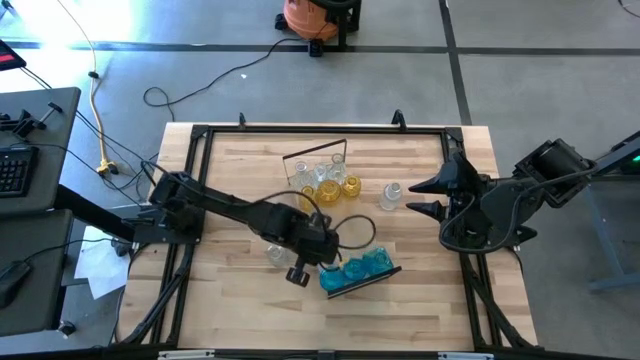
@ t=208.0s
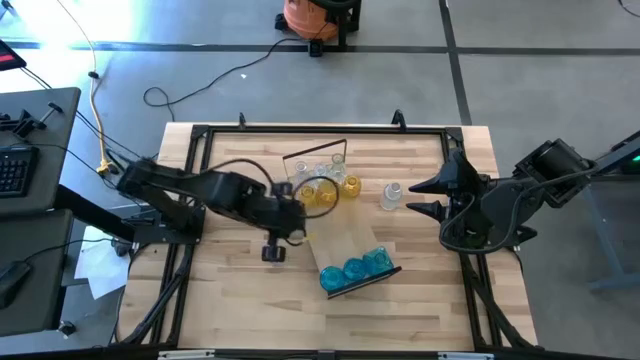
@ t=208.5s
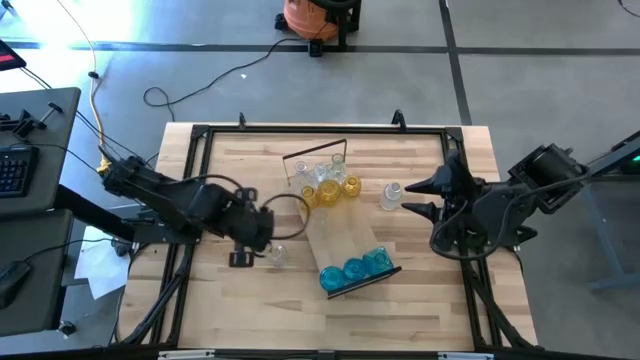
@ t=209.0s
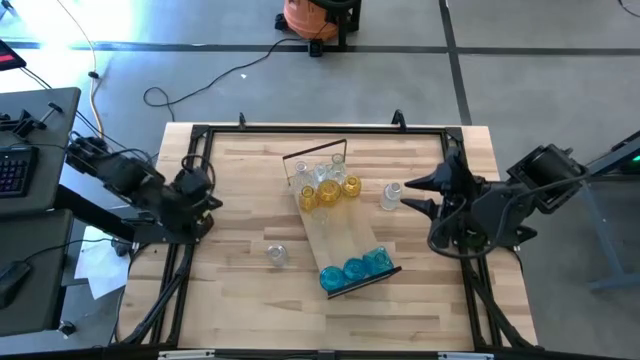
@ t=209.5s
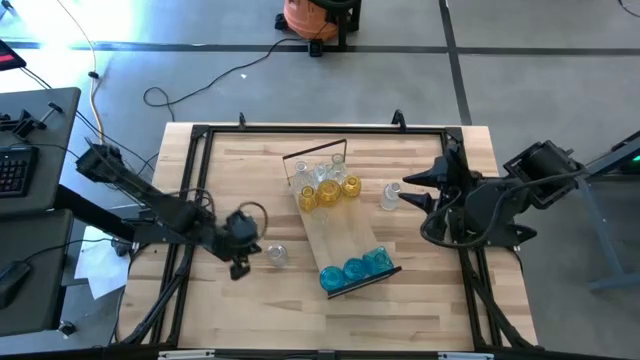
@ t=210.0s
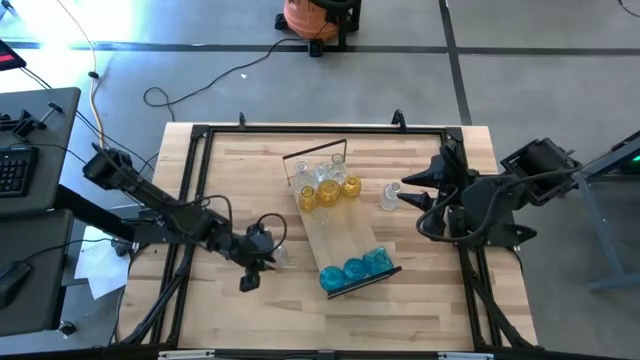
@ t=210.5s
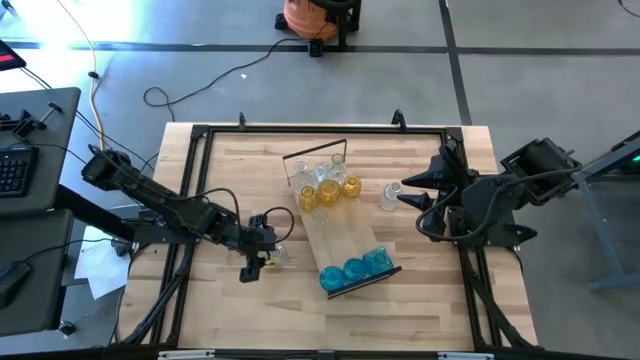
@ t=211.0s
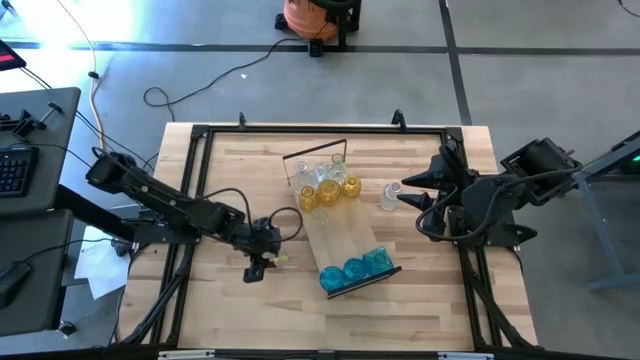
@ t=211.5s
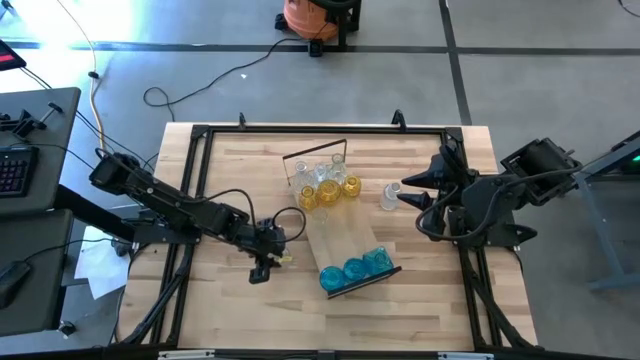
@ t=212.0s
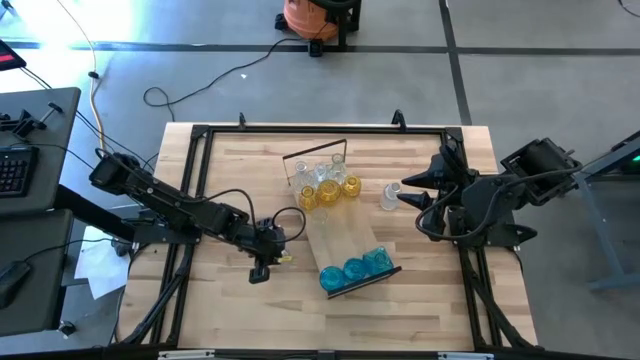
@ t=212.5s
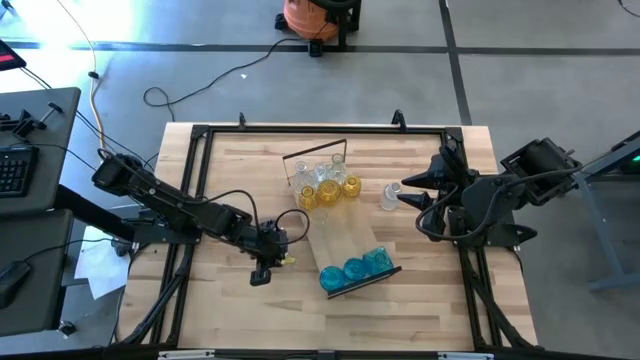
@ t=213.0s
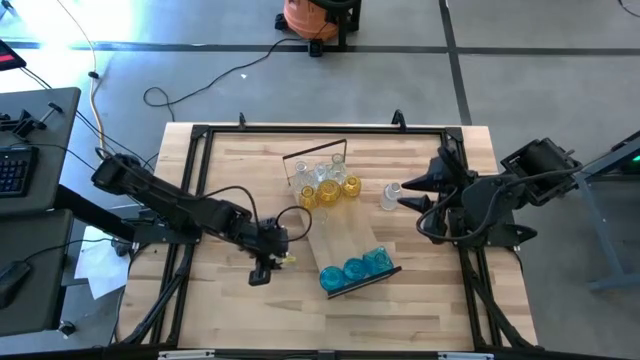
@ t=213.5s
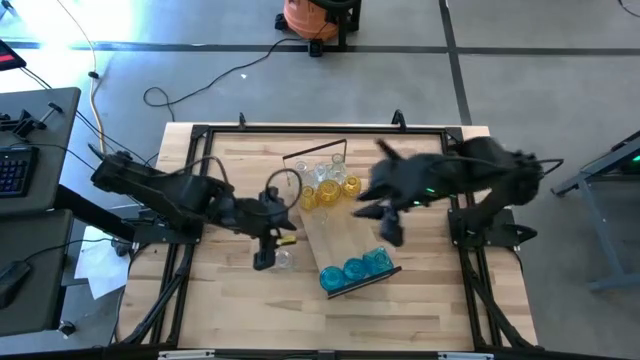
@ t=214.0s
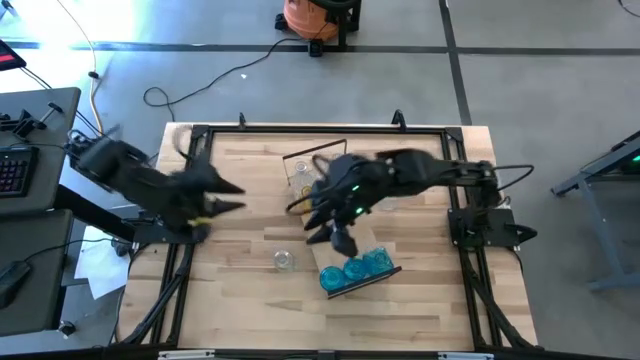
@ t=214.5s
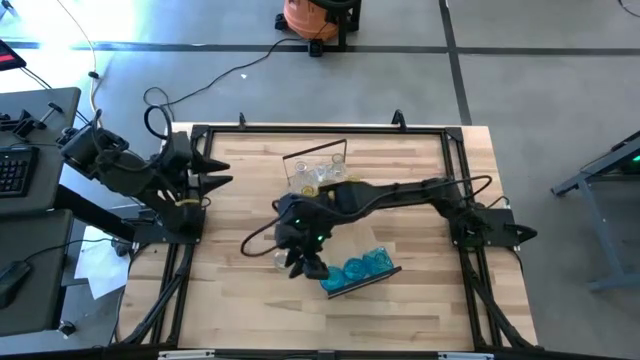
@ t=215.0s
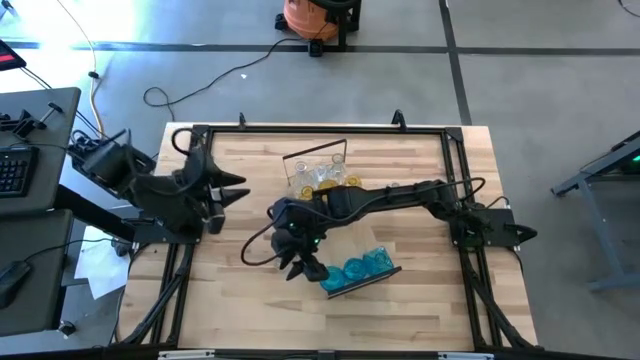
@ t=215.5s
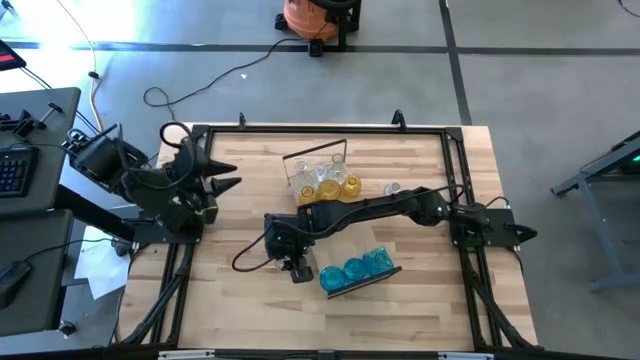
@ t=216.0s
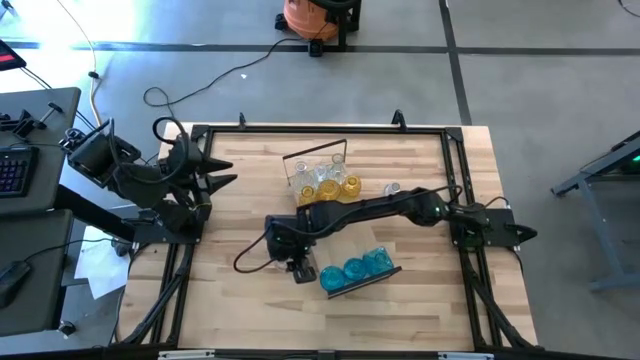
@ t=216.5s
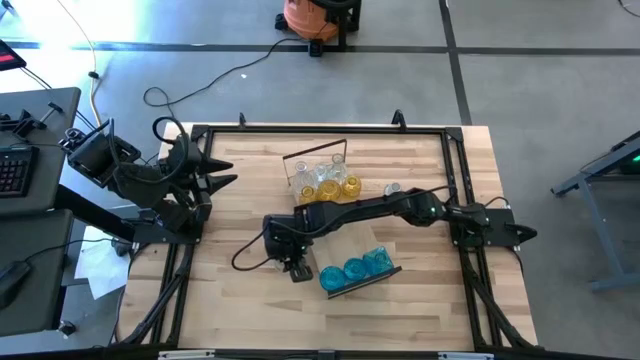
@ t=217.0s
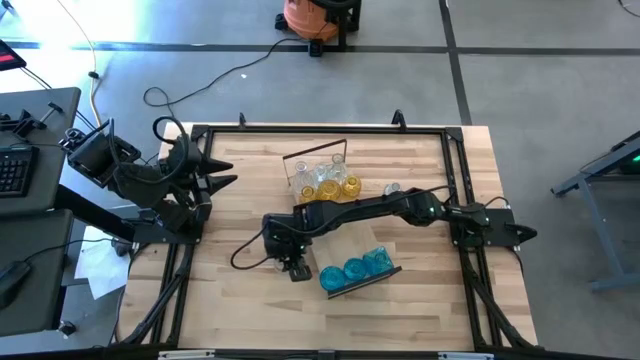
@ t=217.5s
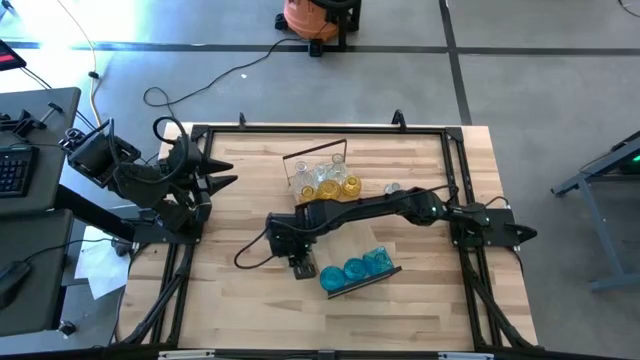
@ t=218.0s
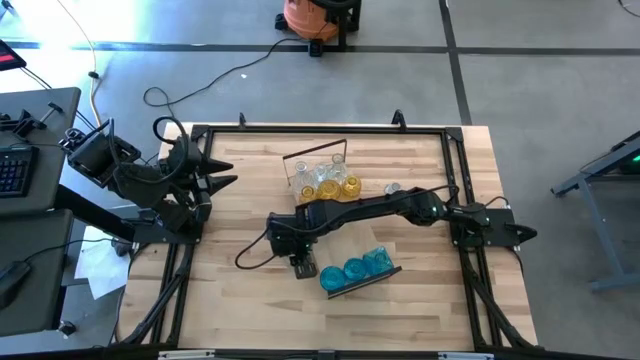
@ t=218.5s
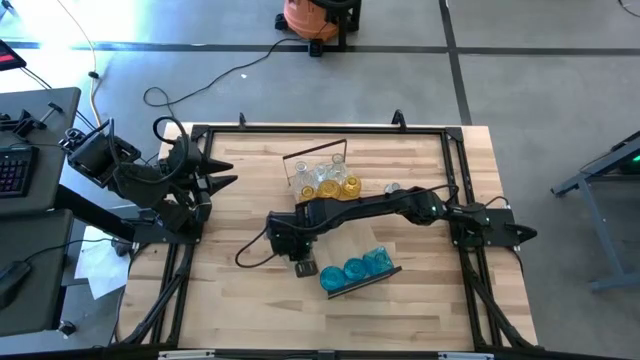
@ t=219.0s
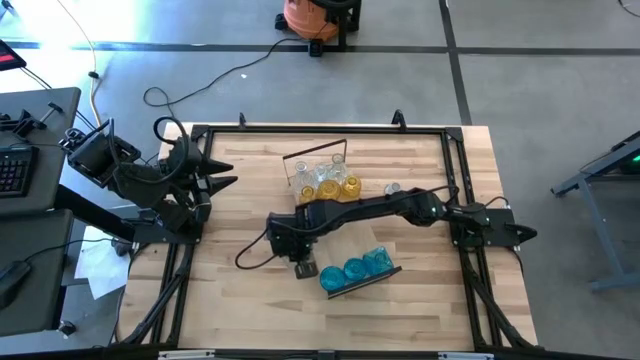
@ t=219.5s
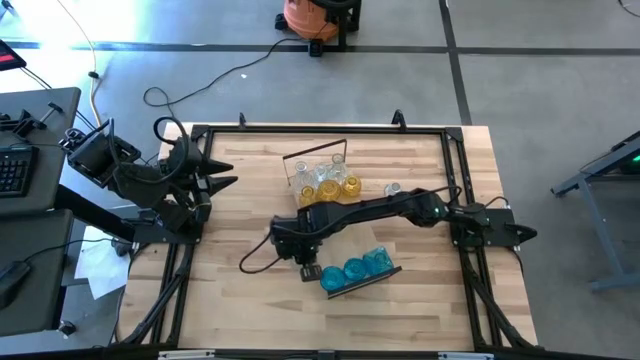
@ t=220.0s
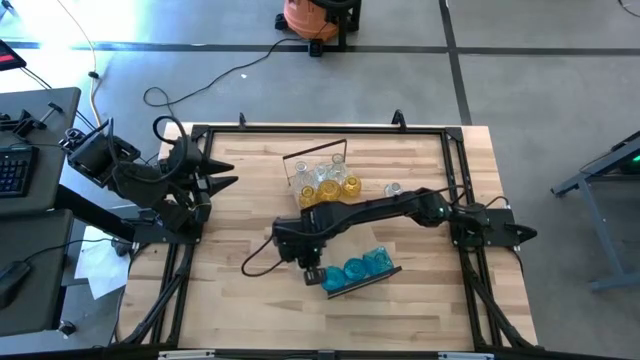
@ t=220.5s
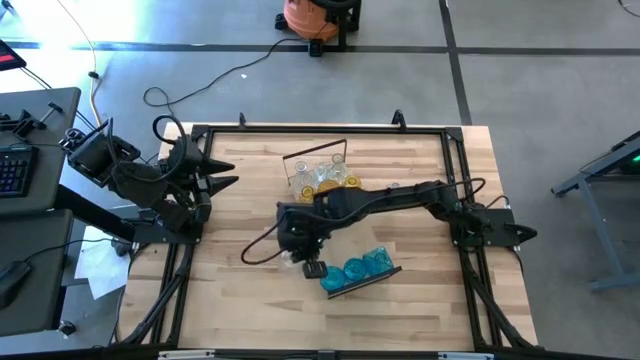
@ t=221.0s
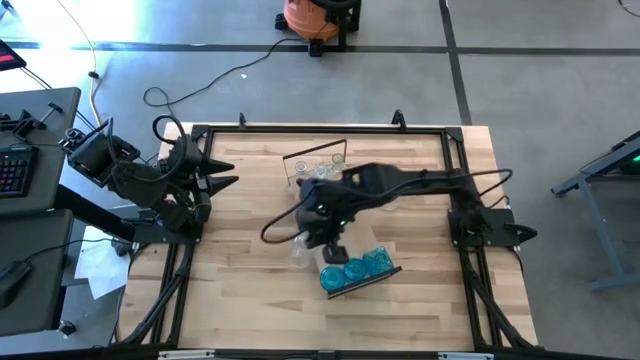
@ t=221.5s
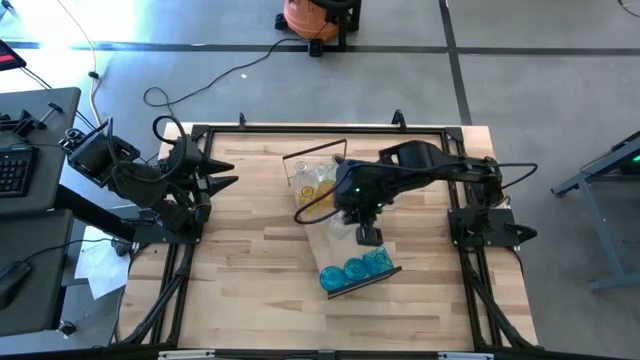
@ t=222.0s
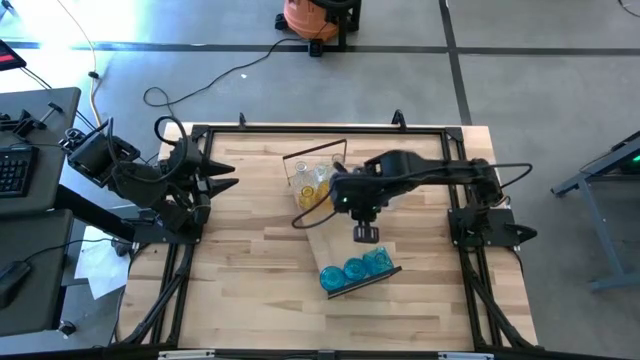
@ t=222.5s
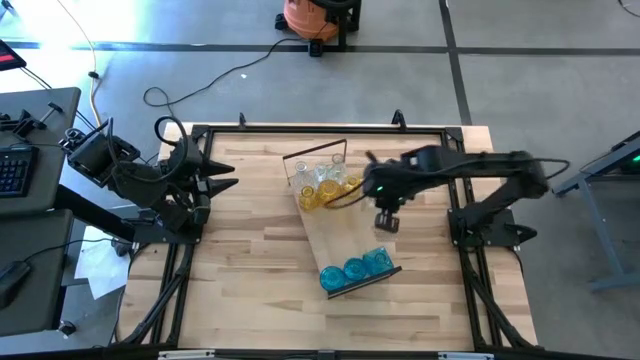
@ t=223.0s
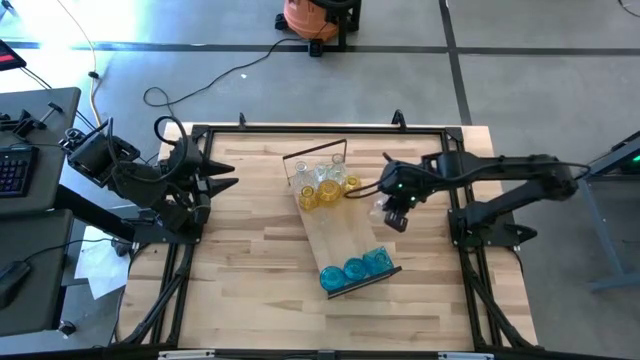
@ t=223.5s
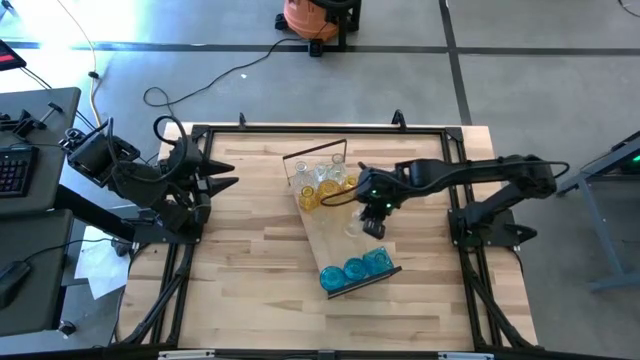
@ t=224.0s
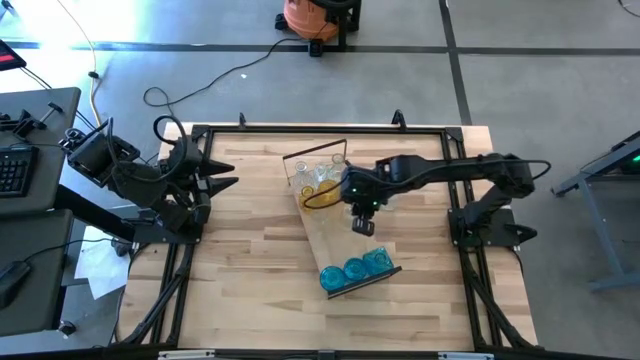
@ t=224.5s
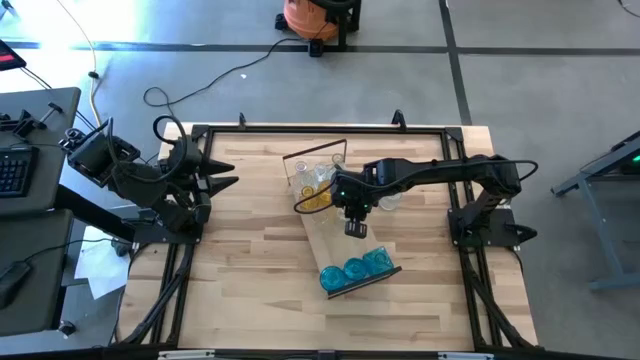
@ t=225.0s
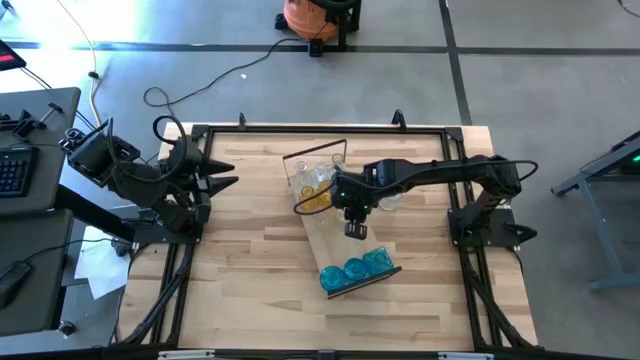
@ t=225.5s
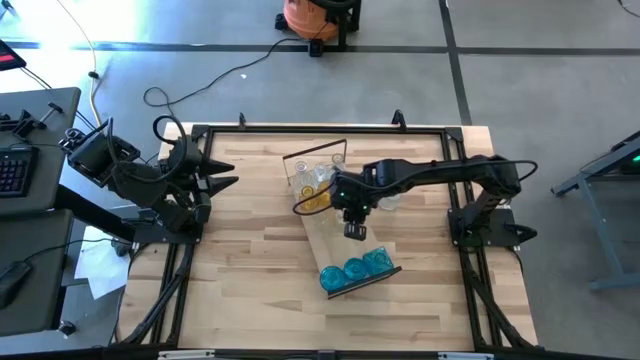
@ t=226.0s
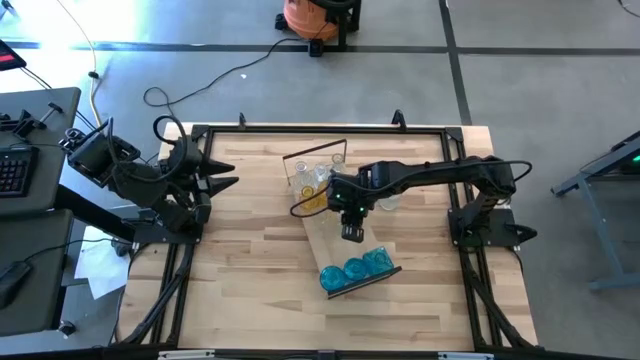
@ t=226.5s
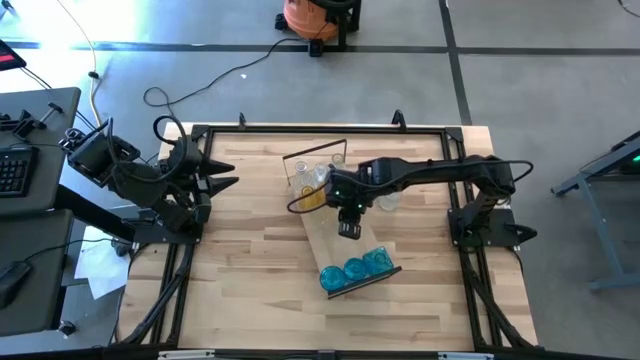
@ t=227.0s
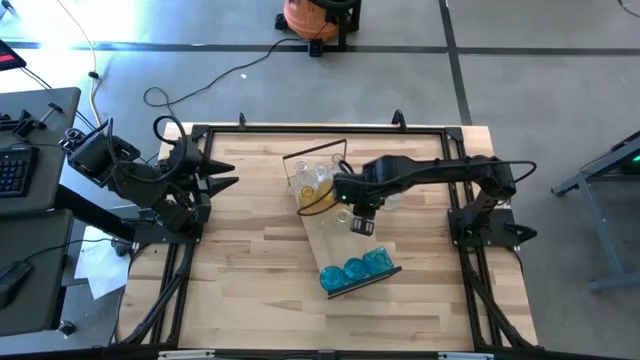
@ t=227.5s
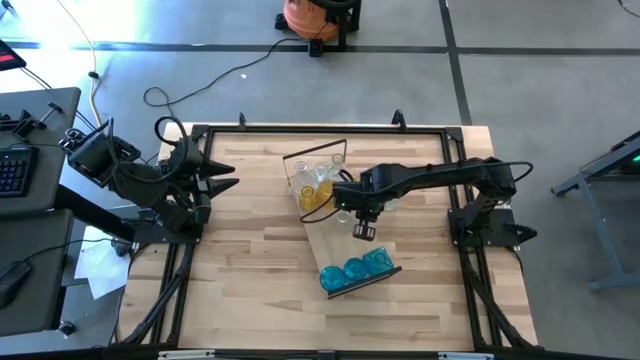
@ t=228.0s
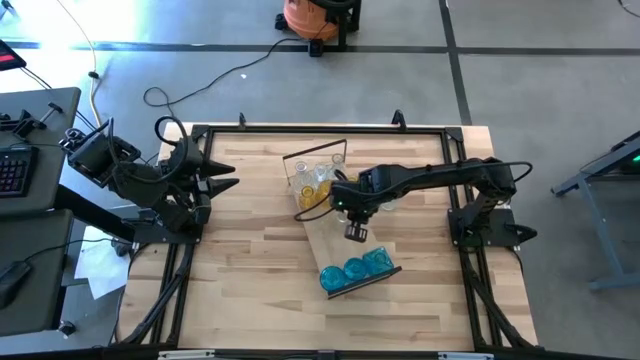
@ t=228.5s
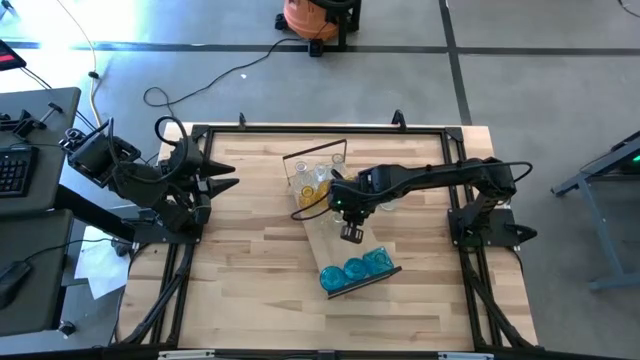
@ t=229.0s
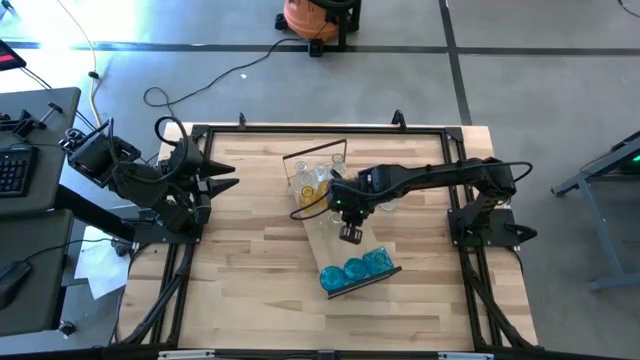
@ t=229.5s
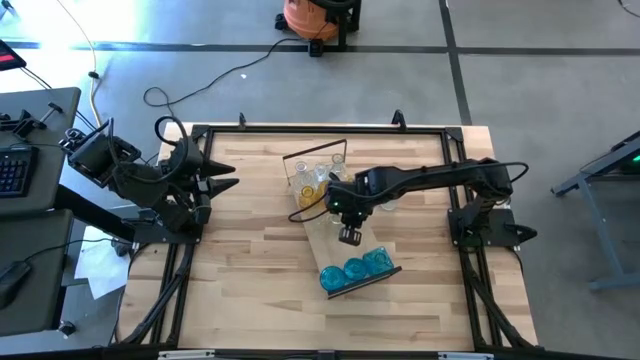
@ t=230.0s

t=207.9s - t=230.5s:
Task: sort vases onto shelf
Put the transparent crystal vase on the shelf aligned with the other transparent crystal vase
